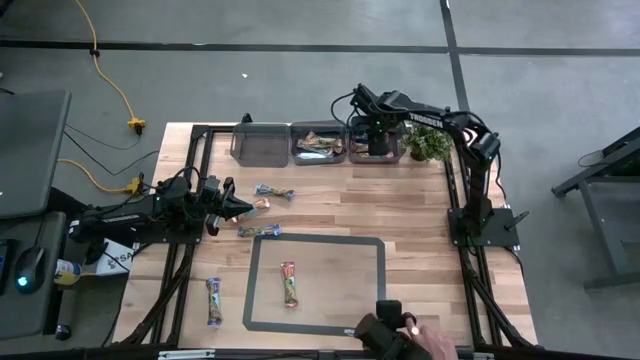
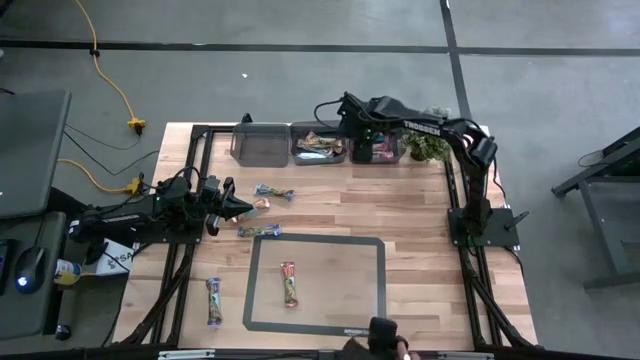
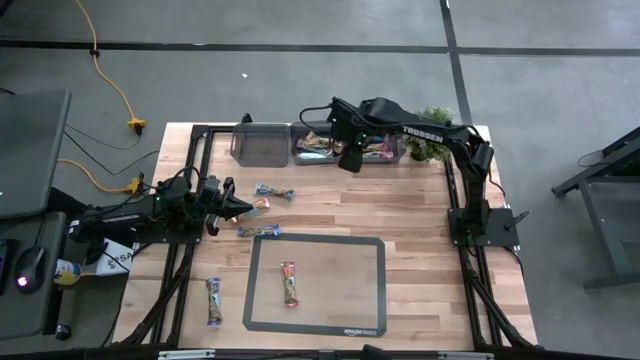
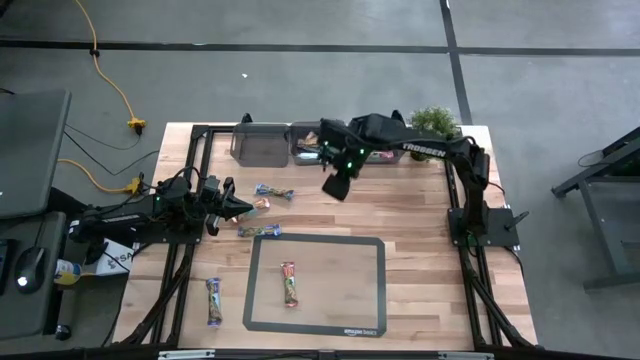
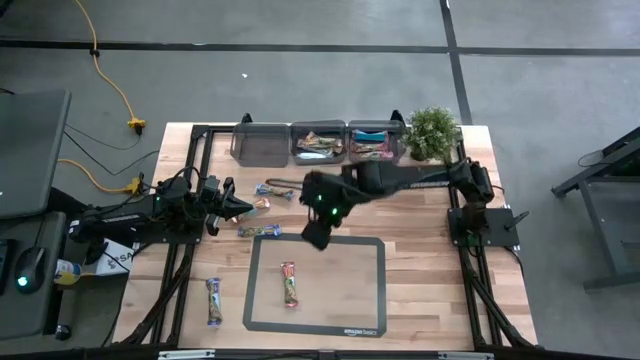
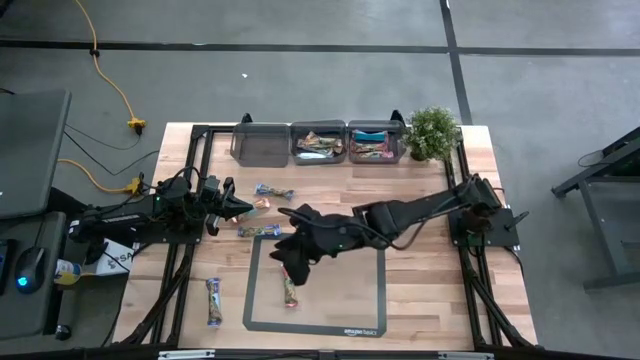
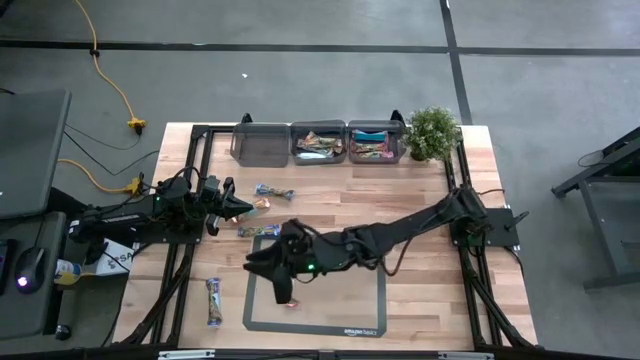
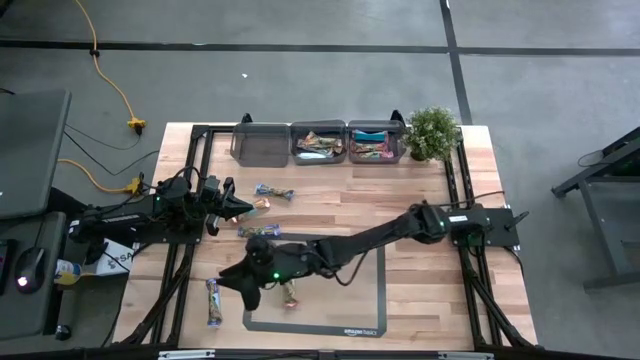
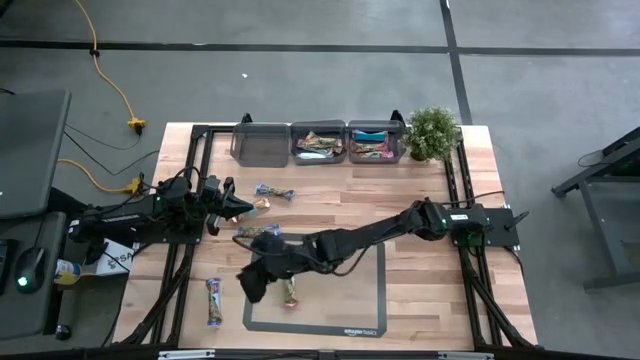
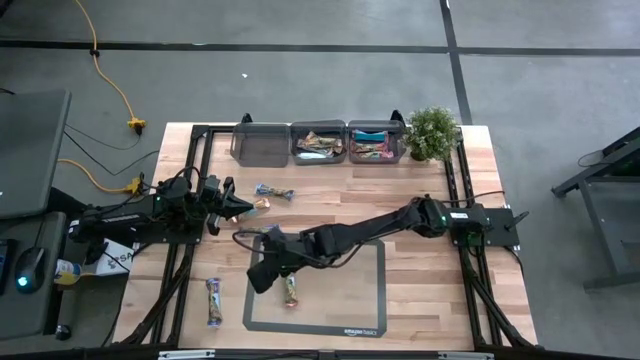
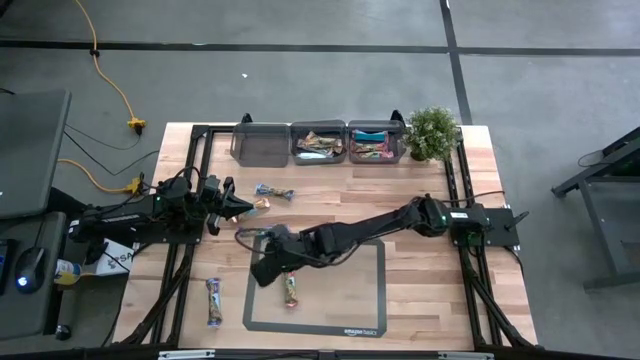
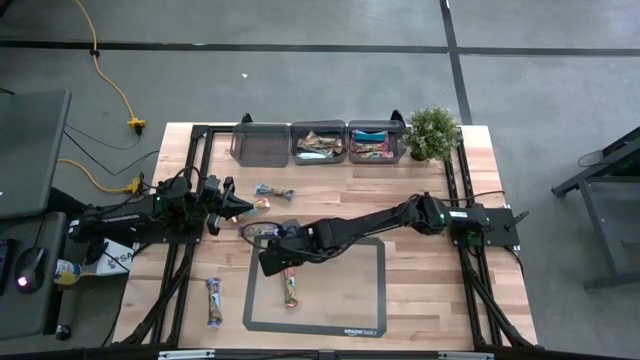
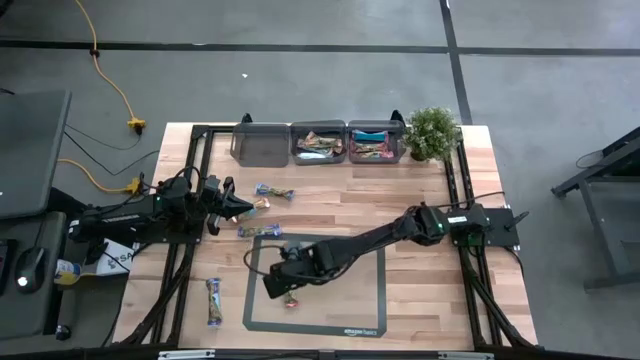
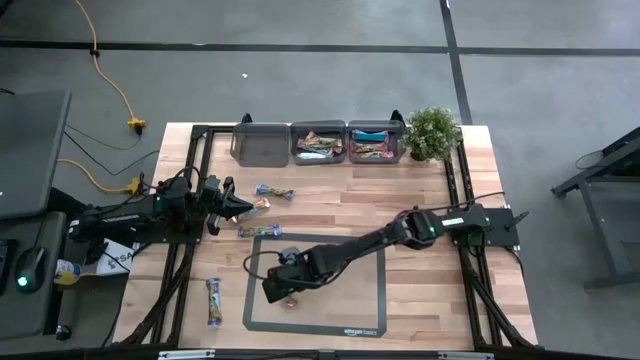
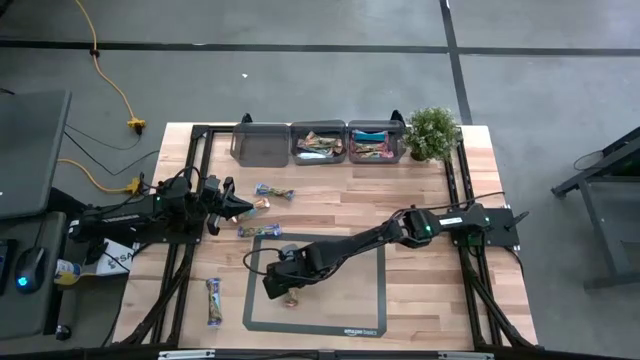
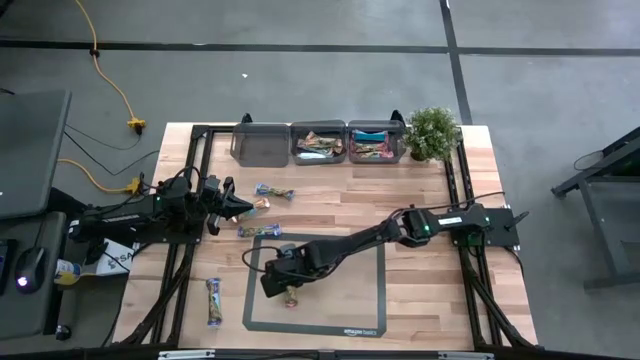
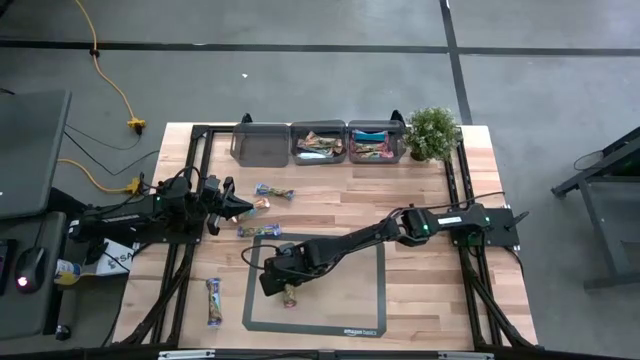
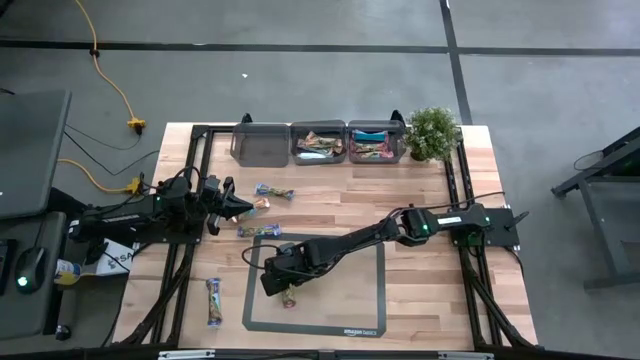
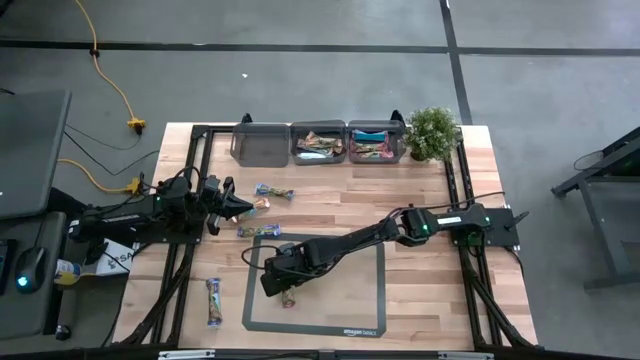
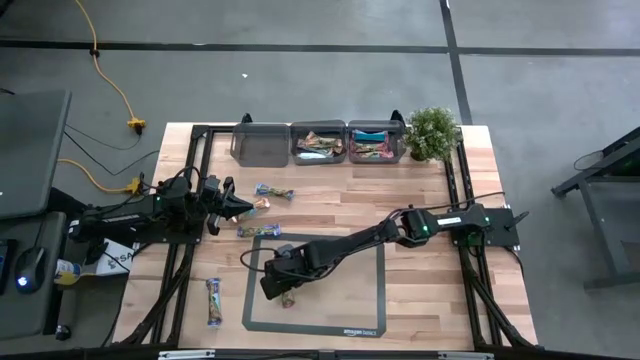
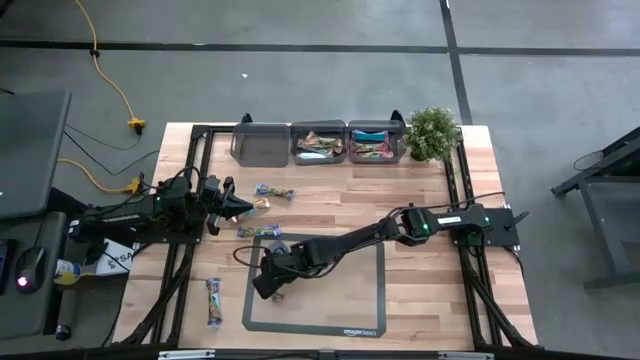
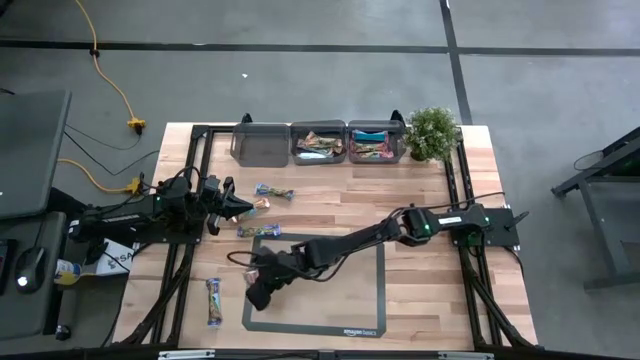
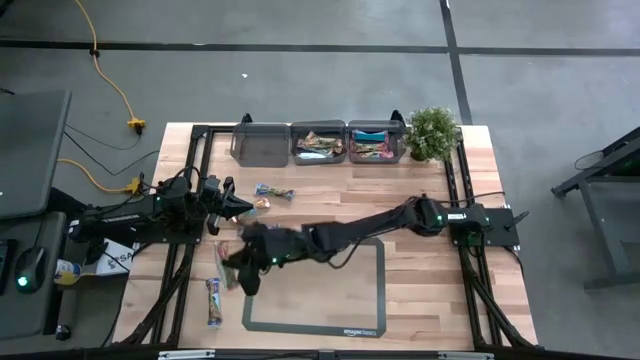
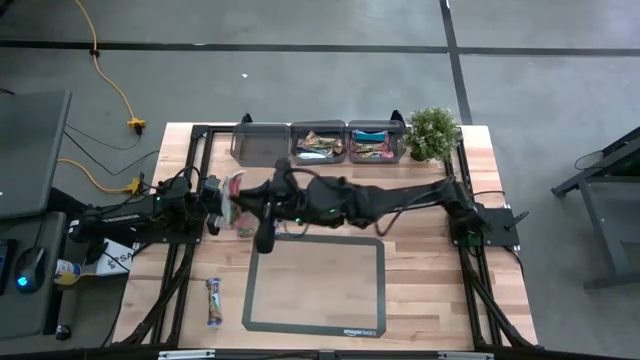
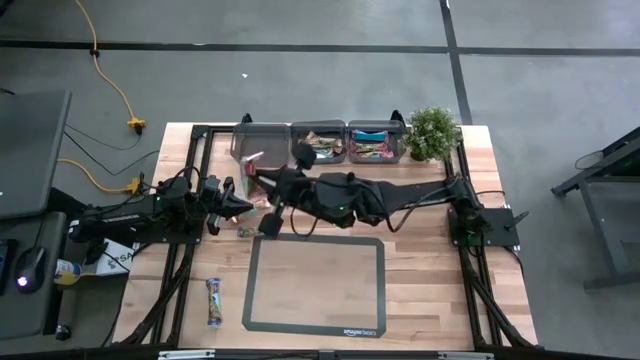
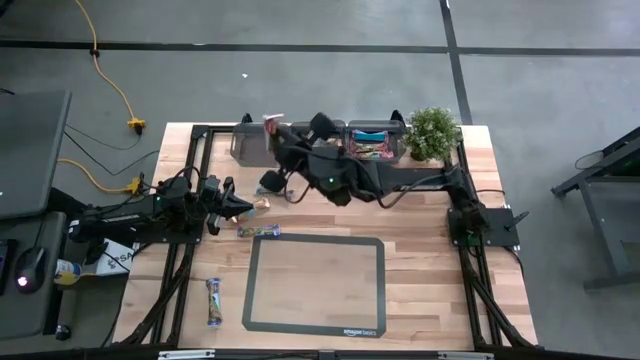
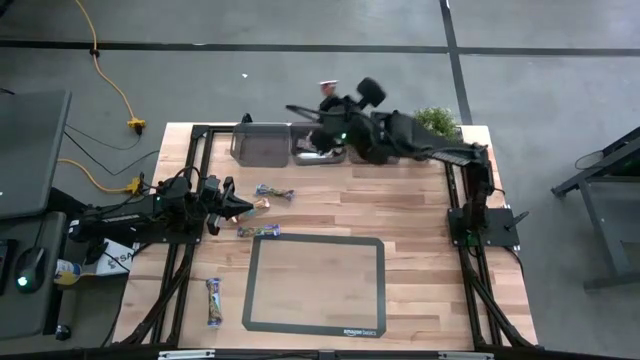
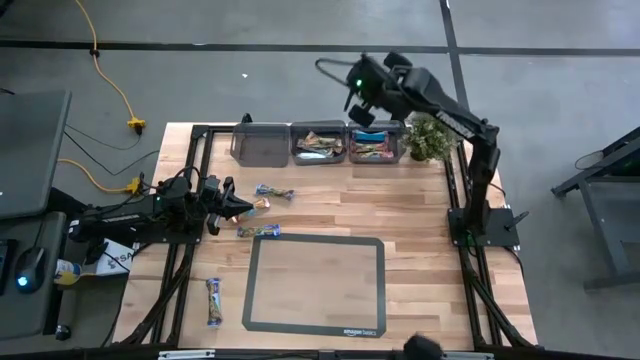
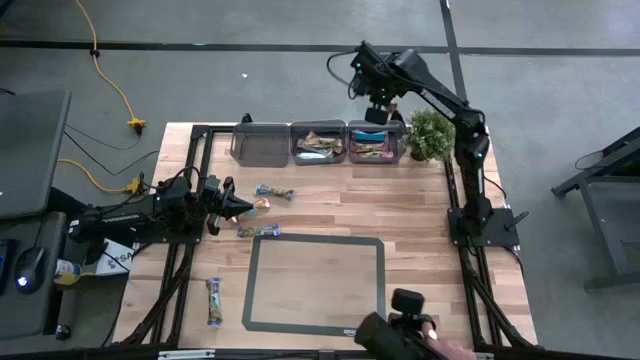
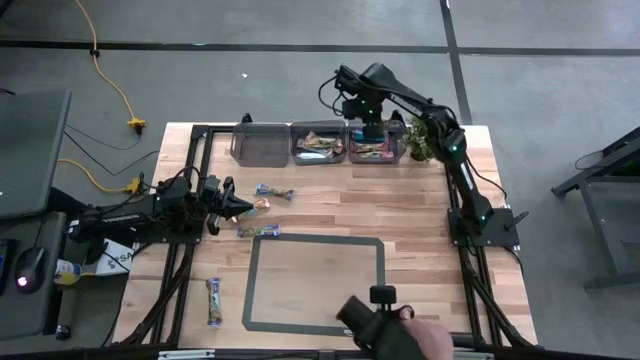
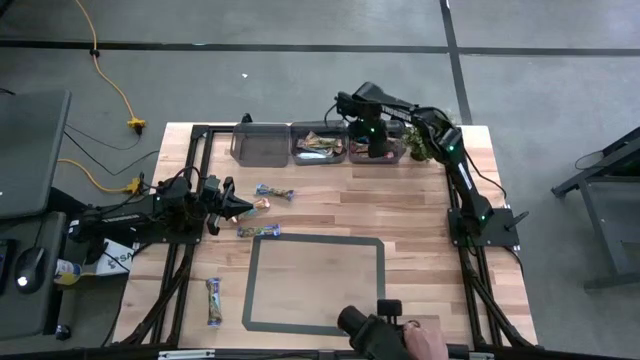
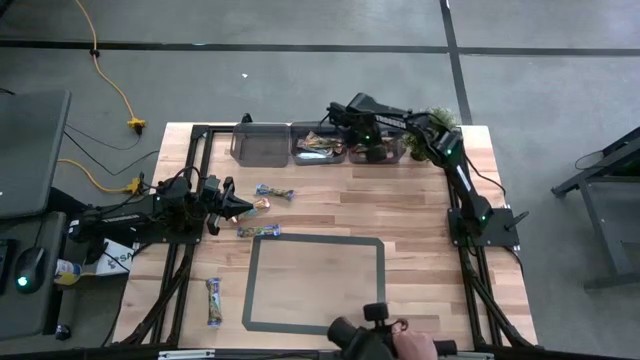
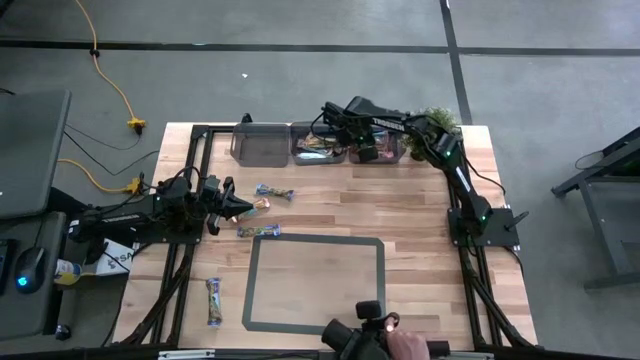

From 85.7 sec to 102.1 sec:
Task: Pick and place Granola Bars by type
Put the red granola bar into the right black bin

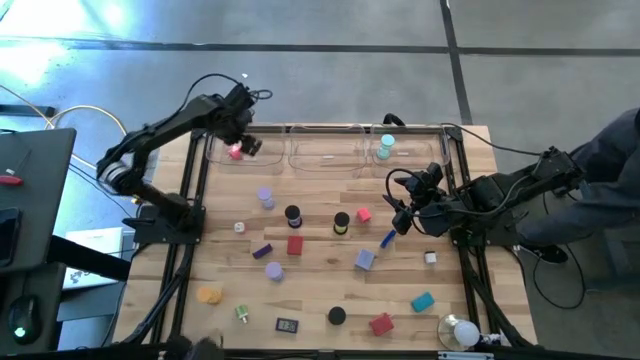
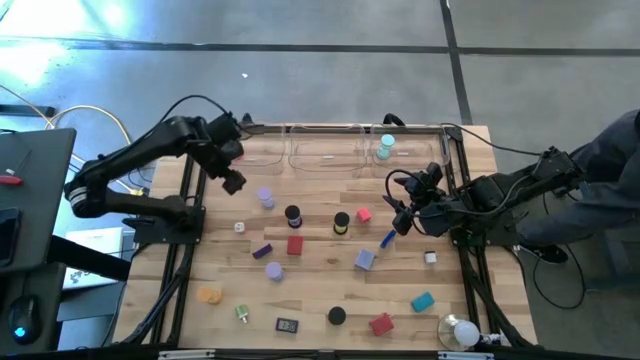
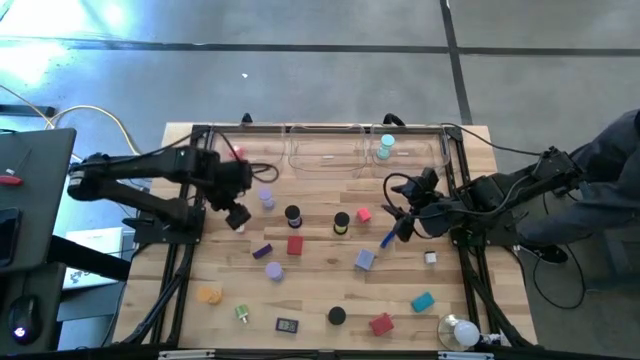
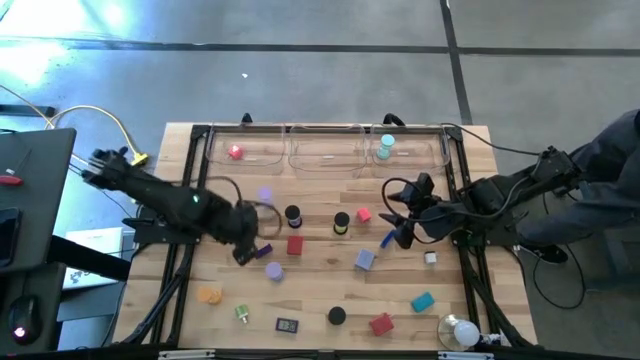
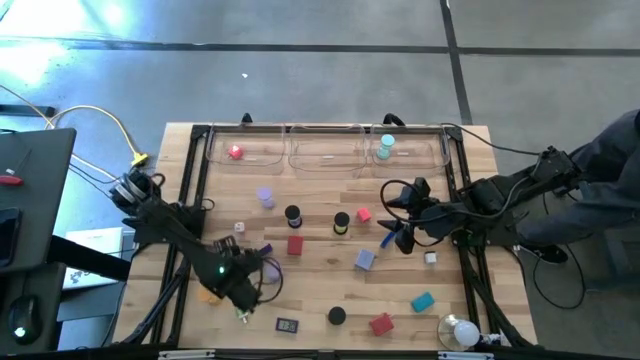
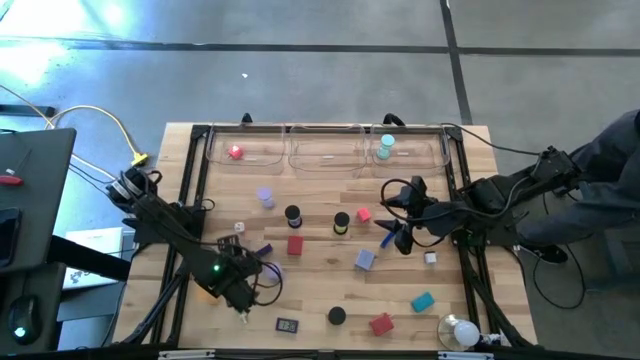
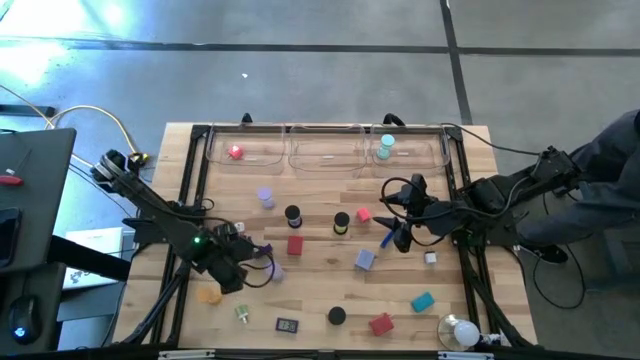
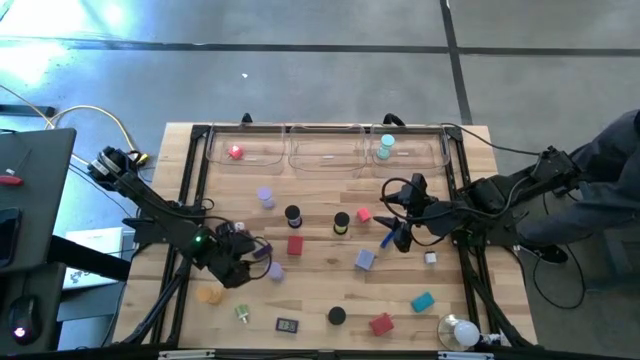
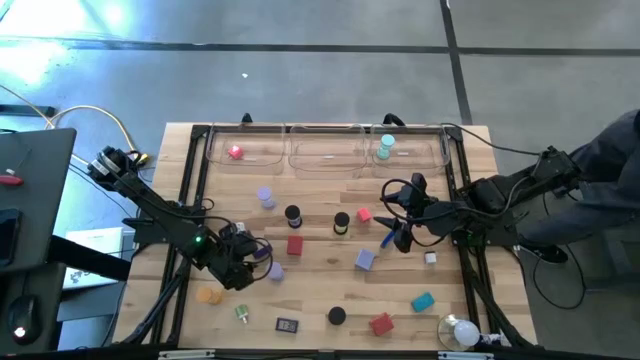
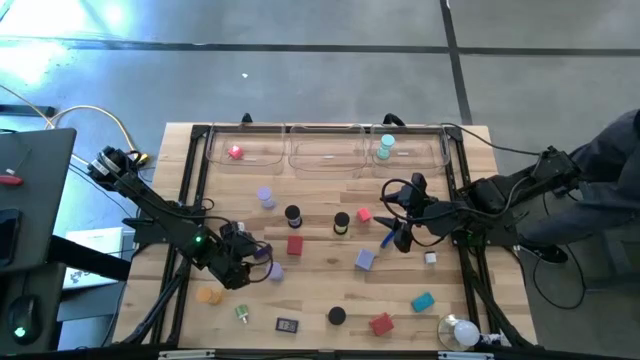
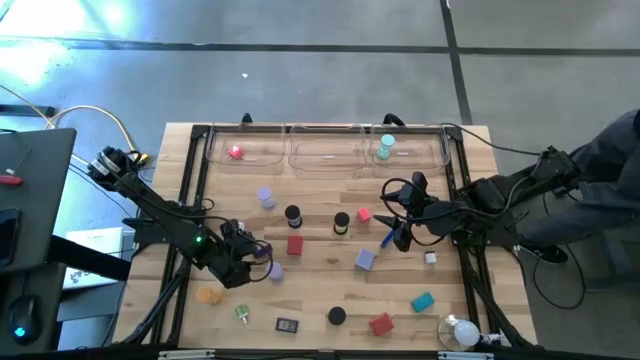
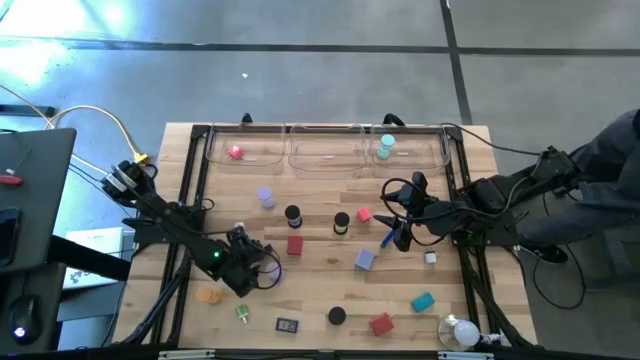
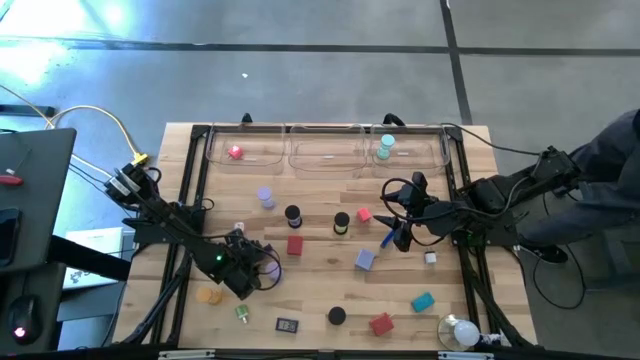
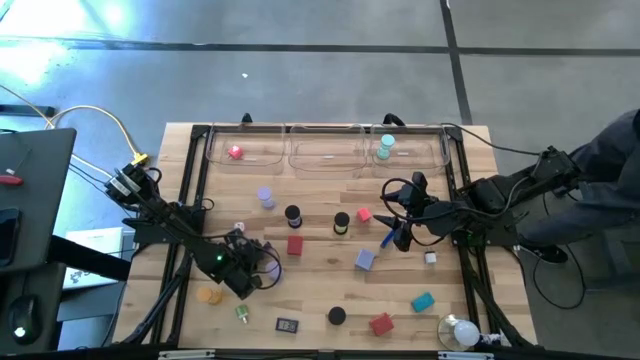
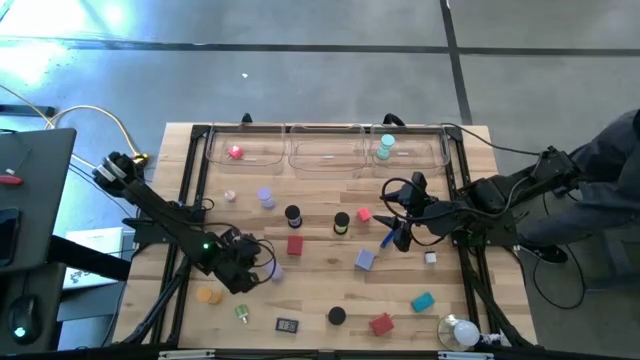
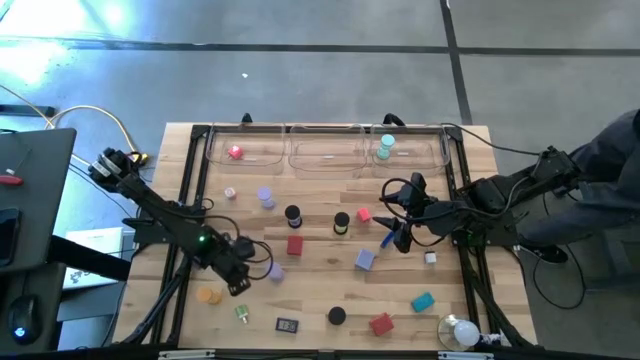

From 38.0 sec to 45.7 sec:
Task: Pick & Place Office items
Put the left blue digital clock into the middle transparent bin
